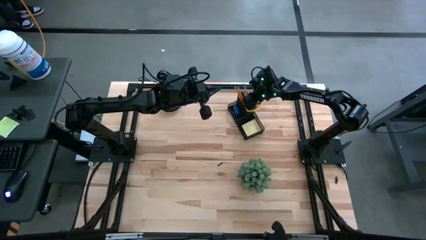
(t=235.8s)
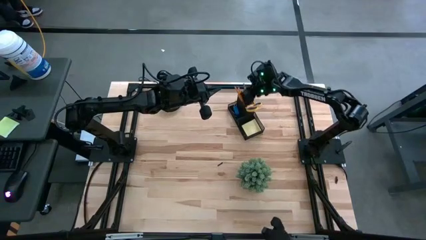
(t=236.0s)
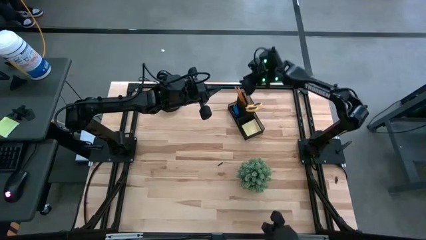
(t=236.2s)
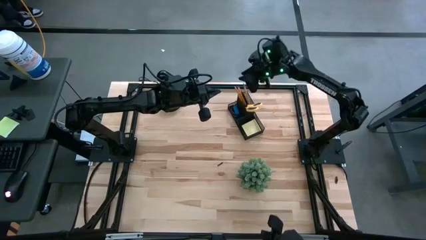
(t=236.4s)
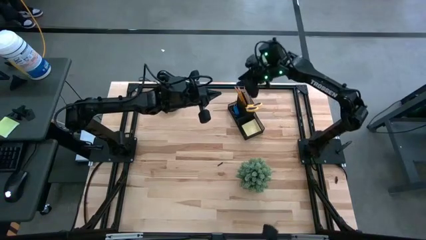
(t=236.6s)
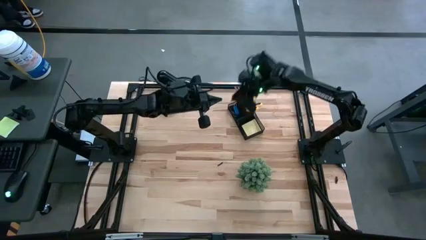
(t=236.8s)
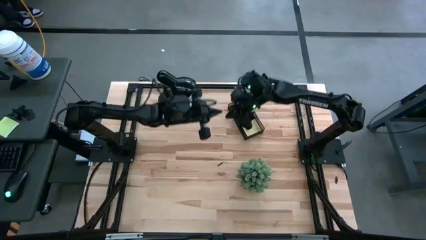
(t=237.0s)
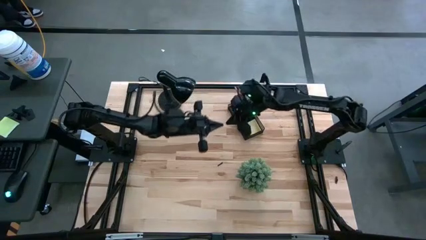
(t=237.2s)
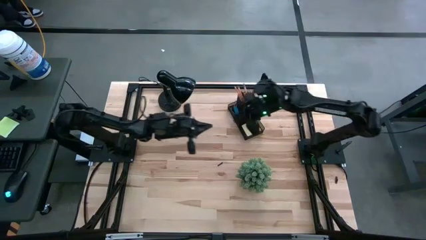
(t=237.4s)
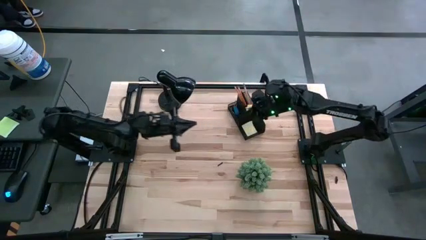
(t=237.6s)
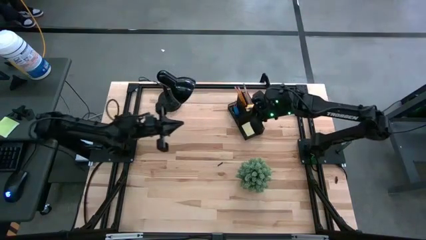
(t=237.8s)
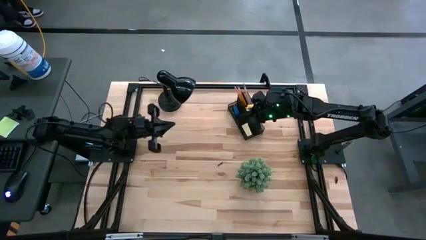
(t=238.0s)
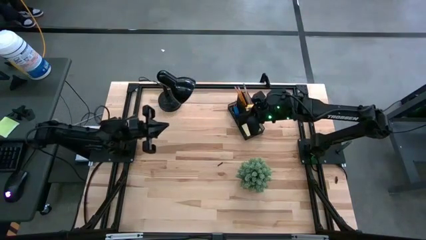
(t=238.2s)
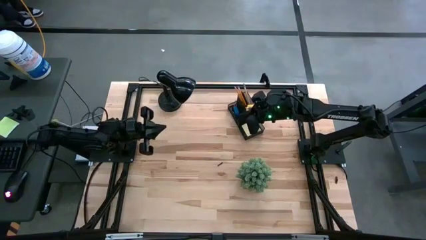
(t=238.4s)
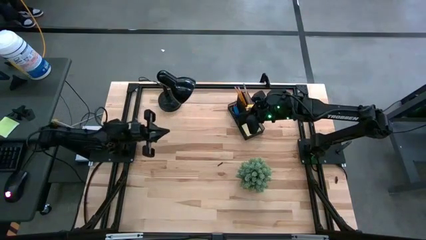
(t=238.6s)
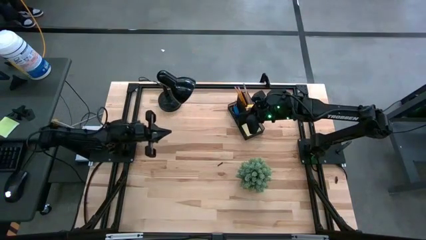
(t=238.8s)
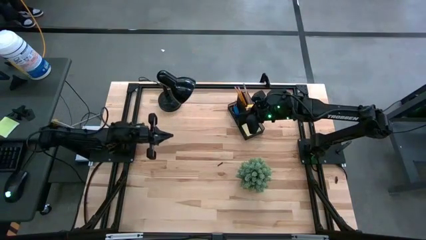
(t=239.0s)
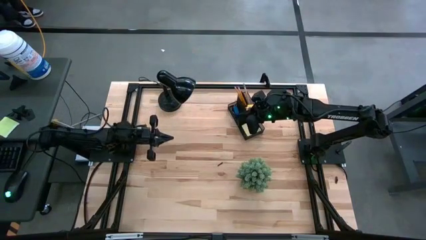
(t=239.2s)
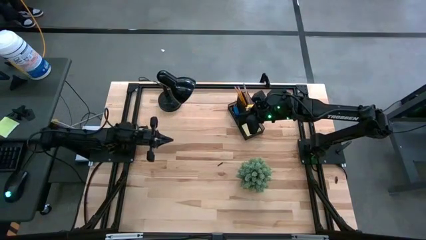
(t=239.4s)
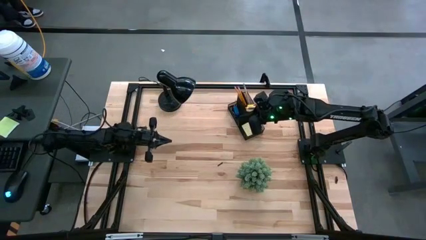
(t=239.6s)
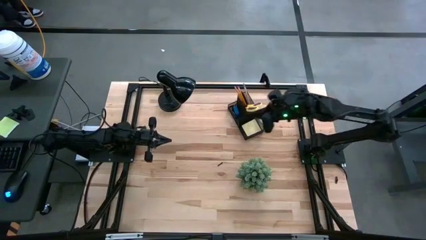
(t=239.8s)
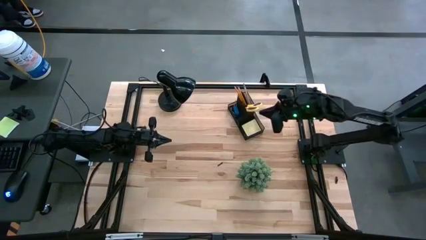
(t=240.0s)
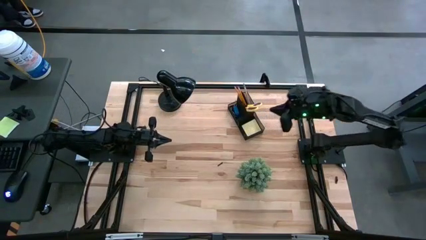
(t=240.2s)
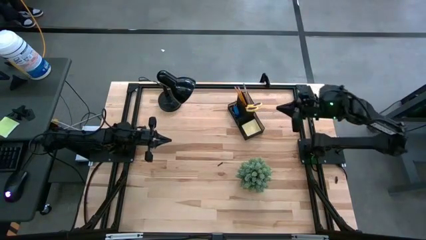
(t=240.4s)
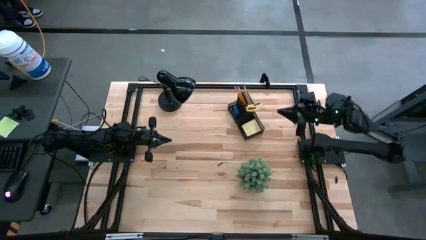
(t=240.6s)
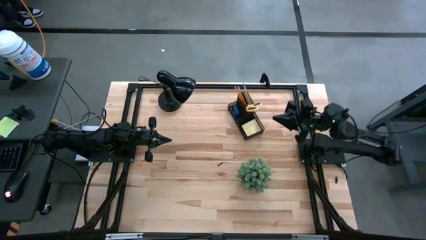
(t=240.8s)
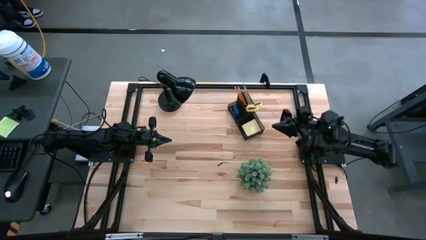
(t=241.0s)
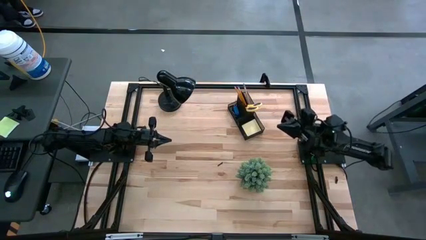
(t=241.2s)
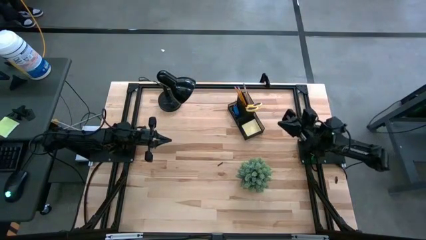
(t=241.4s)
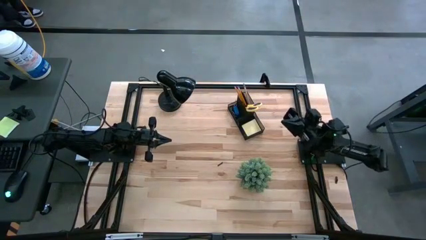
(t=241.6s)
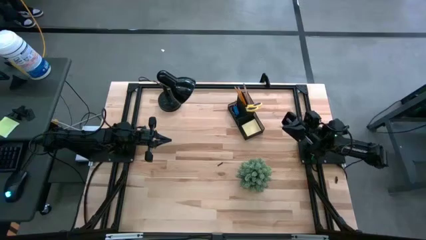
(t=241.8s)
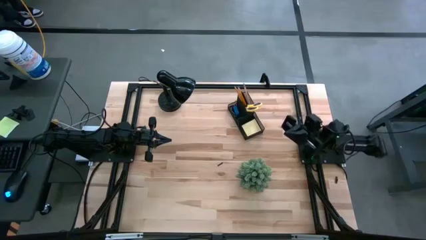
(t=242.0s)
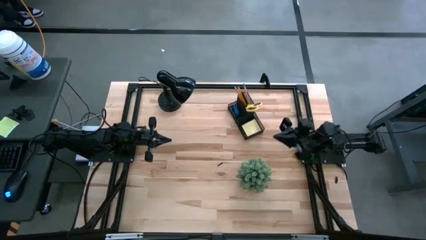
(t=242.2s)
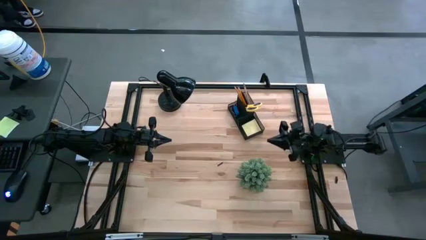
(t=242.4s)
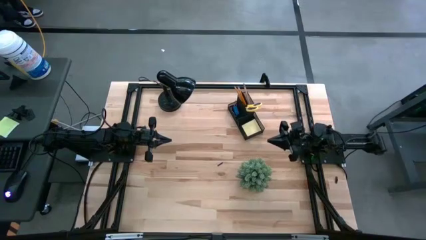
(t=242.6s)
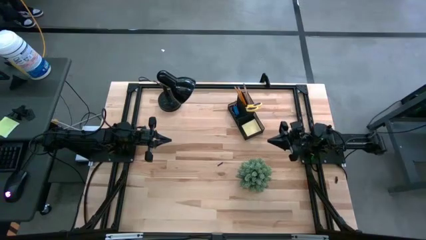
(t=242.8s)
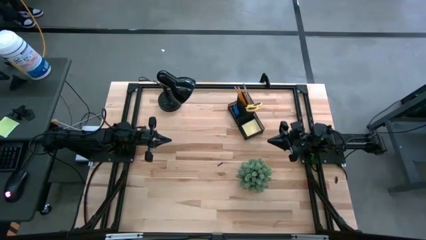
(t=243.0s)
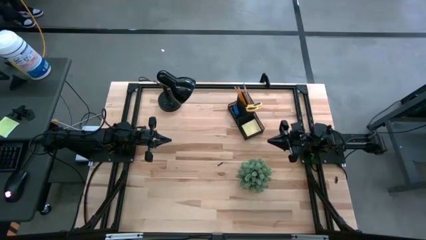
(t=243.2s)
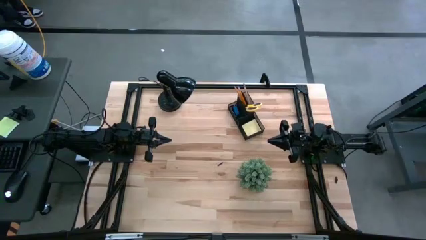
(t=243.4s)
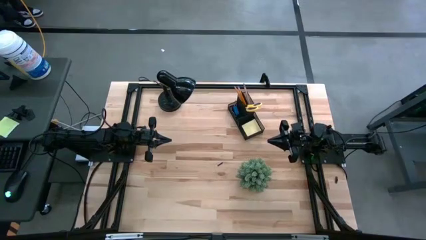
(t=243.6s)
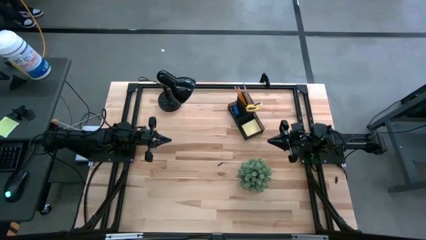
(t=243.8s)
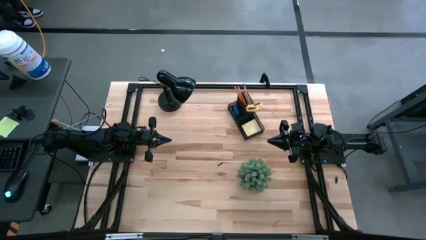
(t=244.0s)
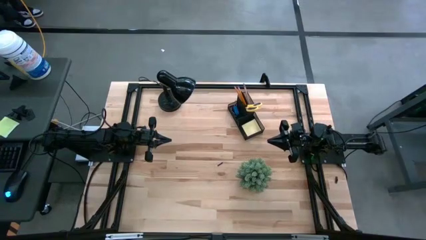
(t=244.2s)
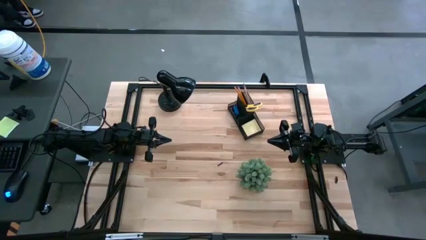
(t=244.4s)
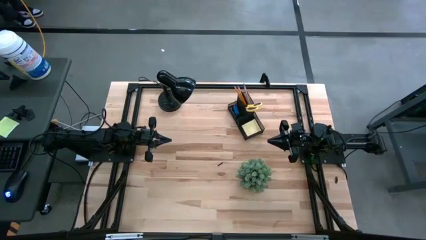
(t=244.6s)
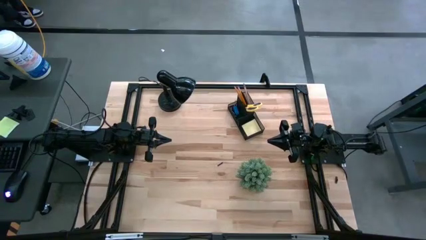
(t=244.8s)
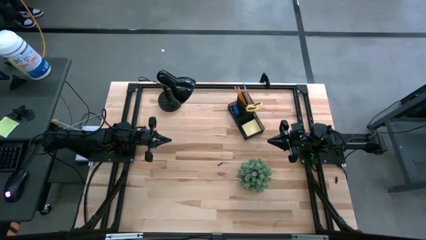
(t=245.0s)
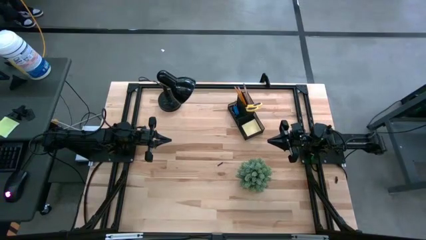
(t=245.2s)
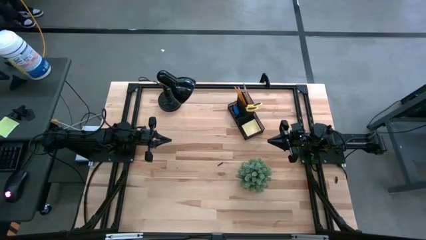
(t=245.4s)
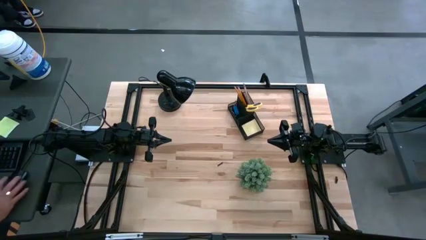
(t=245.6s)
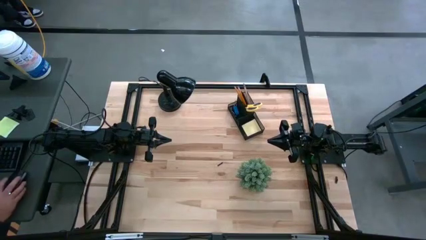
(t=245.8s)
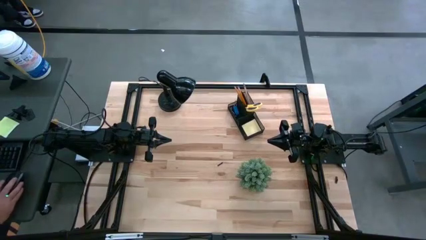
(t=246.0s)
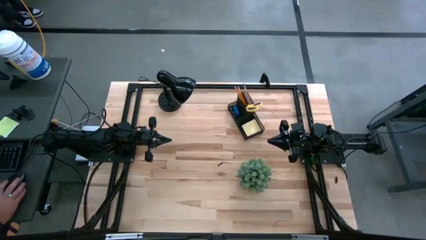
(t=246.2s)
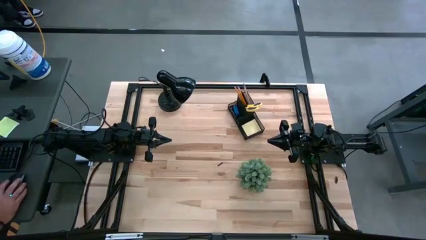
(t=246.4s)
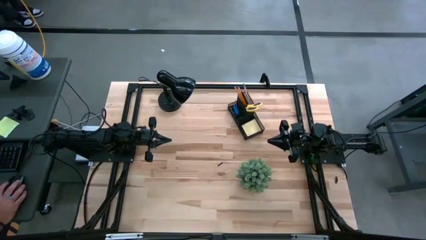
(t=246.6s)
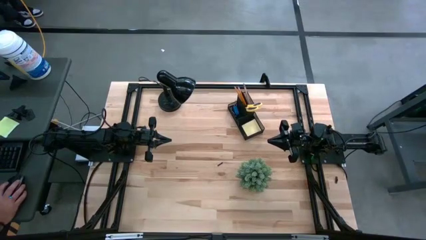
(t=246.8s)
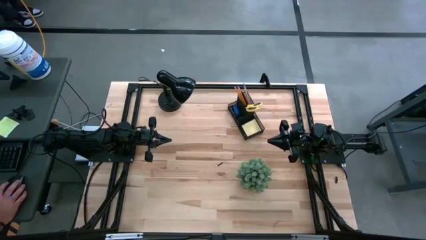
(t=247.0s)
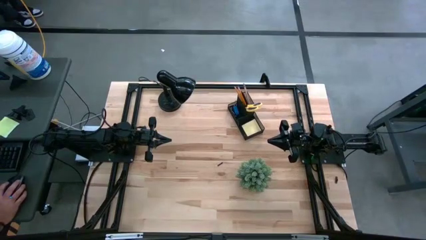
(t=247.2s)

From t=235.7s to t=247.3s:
Task: Pick and place office supplies into organizer
Return to Home Position

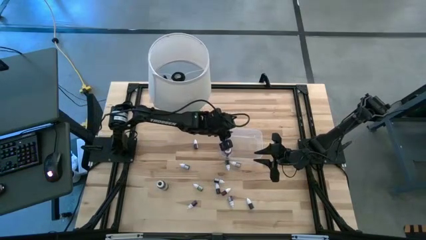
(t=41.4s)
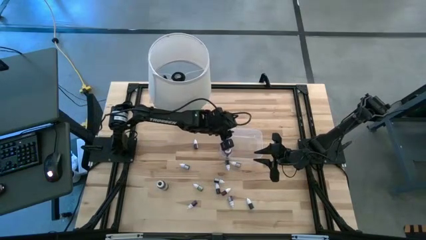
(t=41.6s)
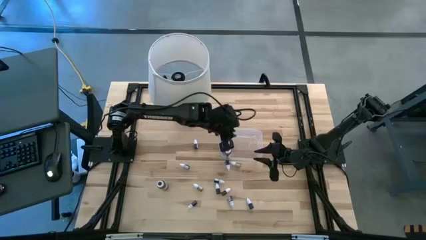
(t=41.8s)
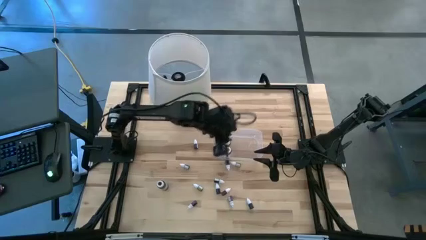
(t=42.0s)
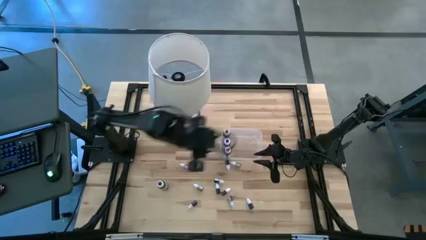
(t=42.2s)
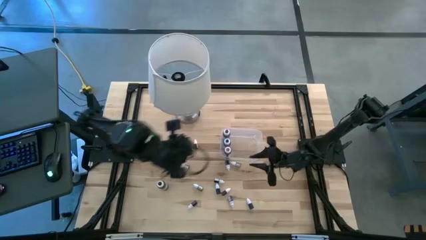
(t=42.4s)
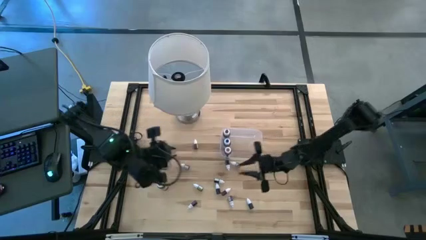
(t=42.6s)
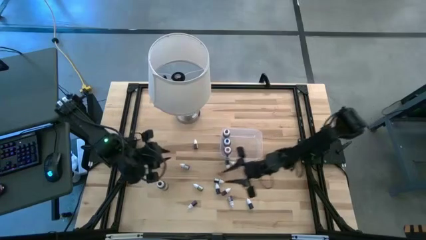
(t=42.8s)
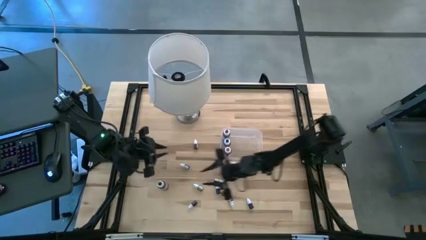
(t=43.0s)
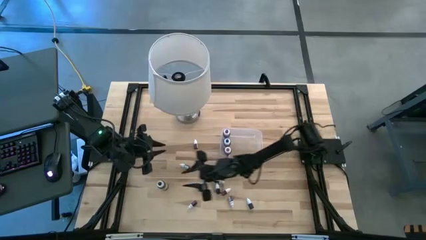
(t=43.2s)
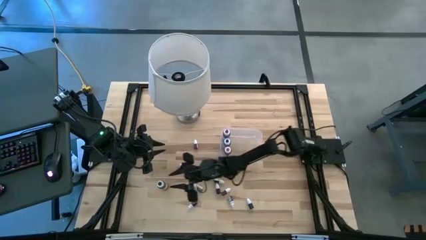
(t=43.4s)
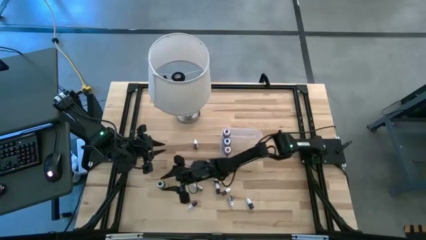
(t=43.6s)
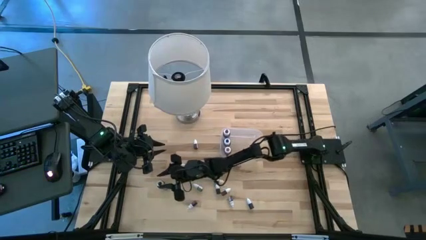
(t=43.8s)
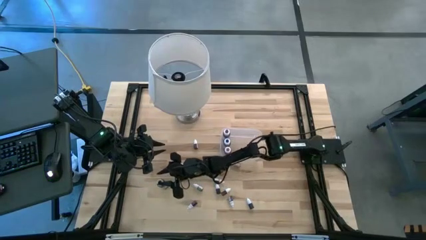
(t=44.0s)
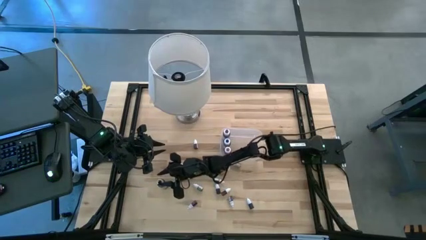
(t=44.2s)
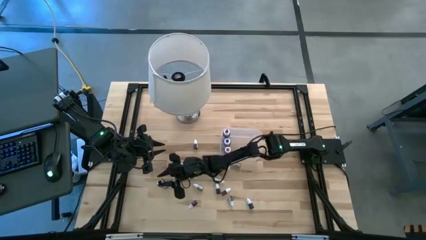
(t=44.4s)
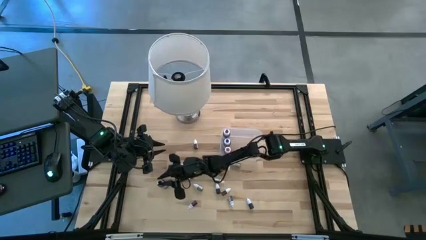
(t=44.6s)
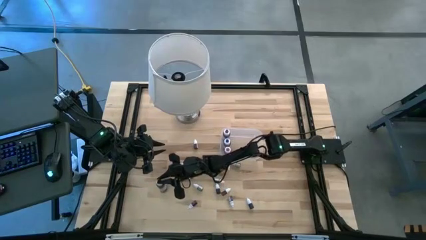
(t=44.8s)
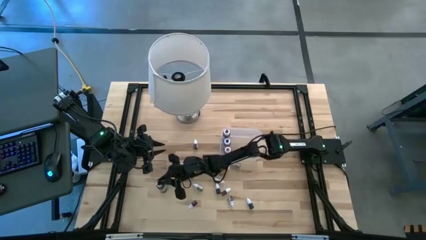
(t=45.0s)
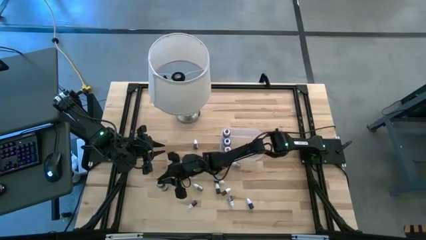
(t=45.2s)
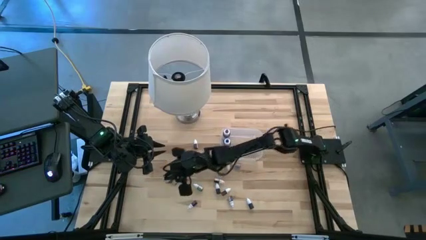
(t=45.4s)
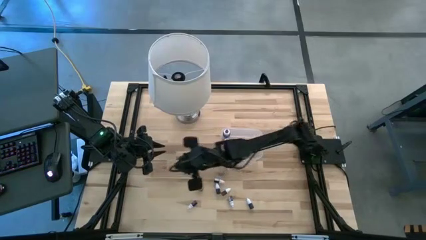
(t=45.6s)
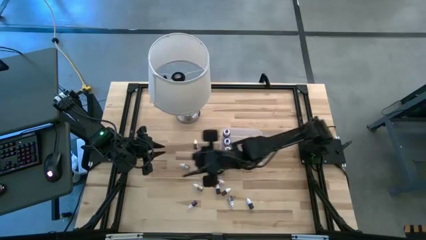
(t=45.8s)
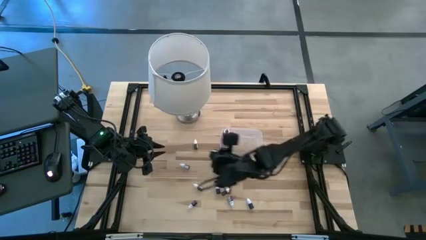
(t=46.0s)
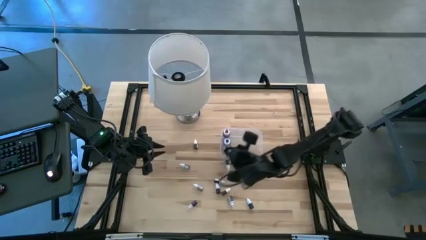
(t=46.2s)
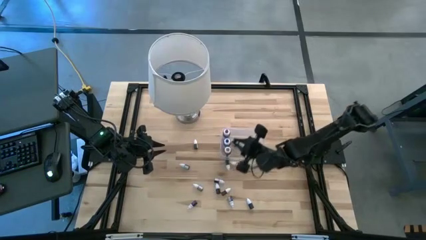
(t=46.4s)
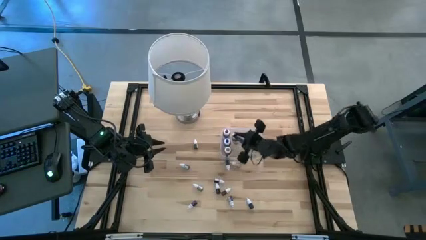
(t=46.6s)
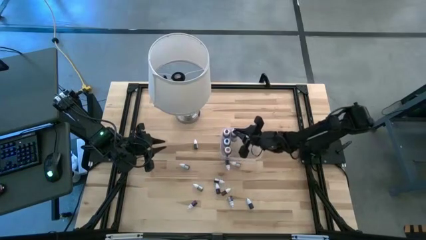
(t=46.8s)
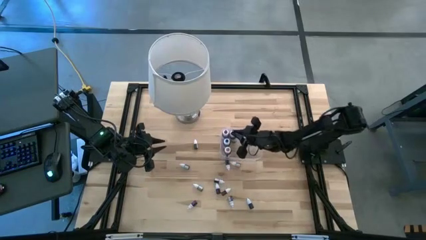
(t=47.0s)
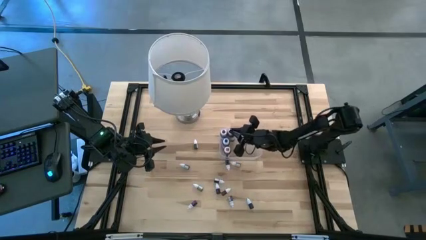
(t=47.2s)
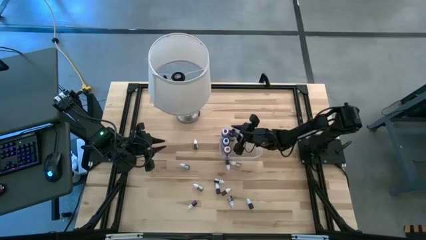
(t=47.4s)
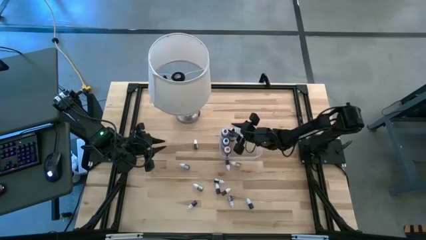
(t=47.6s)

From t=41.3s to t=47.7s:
Task: Pick & Place food coloring
Put the large black food coloring bottle into the transparent bin
